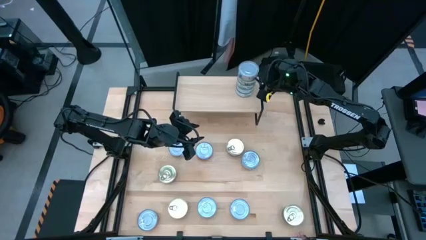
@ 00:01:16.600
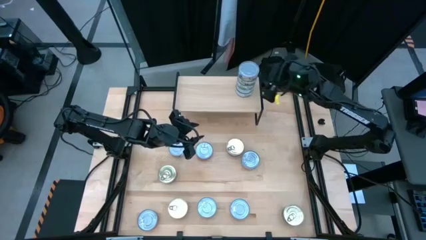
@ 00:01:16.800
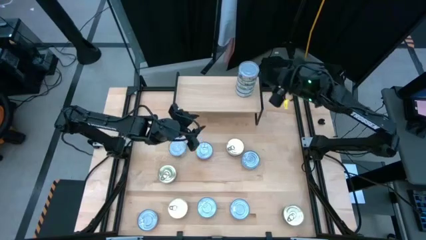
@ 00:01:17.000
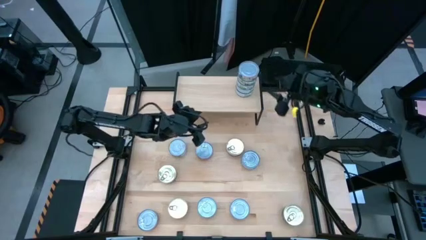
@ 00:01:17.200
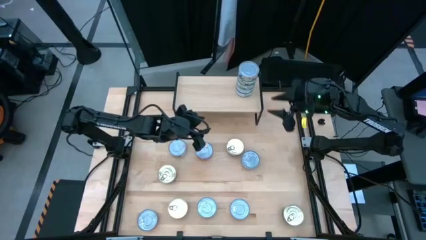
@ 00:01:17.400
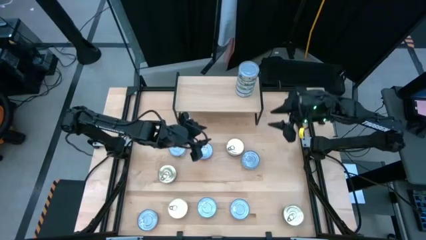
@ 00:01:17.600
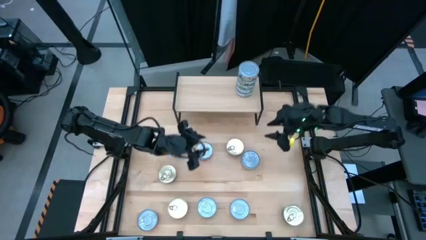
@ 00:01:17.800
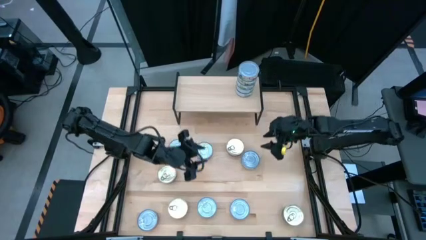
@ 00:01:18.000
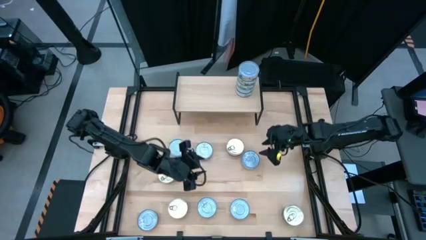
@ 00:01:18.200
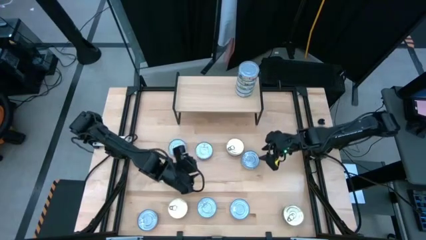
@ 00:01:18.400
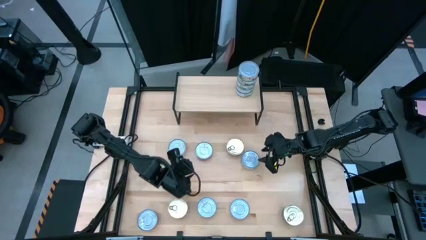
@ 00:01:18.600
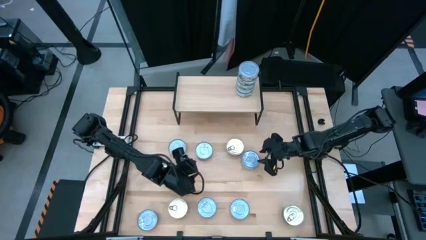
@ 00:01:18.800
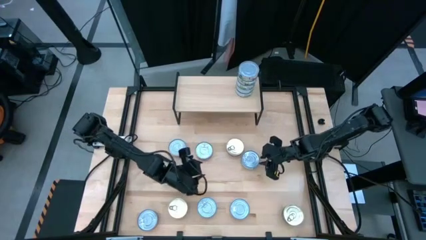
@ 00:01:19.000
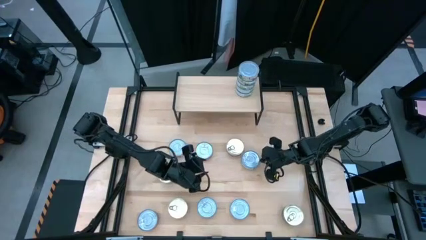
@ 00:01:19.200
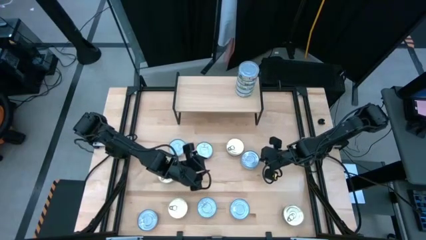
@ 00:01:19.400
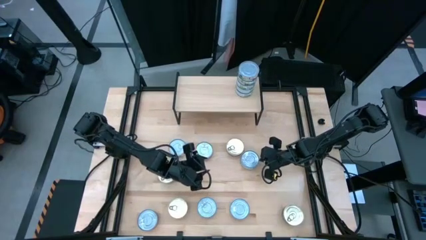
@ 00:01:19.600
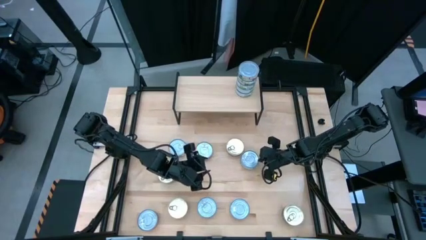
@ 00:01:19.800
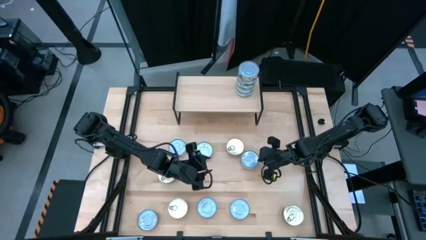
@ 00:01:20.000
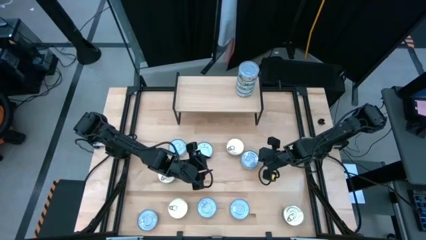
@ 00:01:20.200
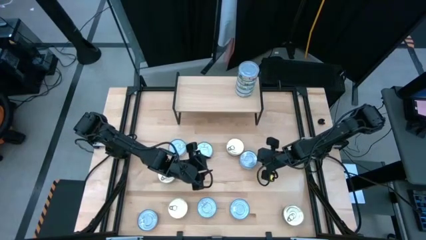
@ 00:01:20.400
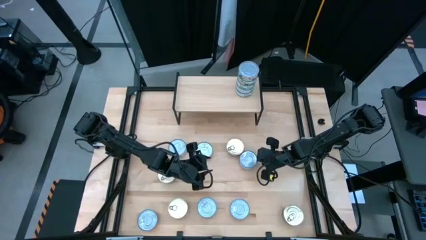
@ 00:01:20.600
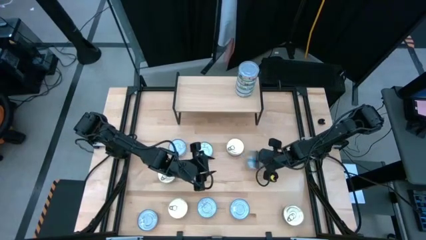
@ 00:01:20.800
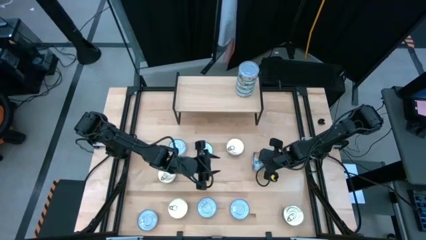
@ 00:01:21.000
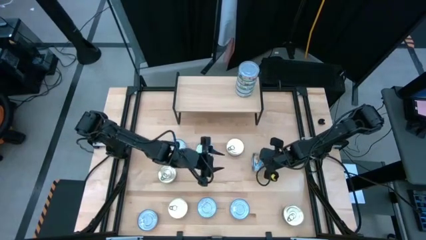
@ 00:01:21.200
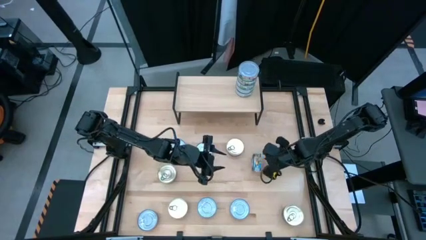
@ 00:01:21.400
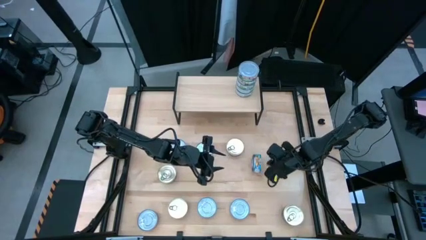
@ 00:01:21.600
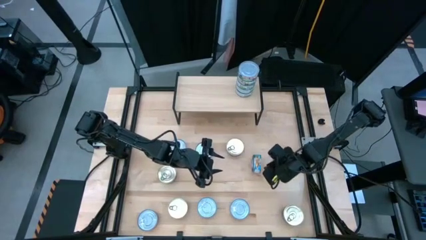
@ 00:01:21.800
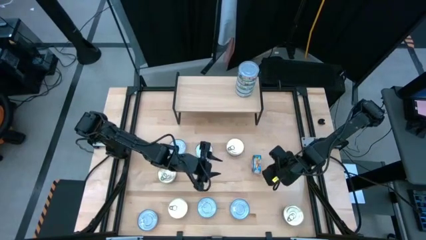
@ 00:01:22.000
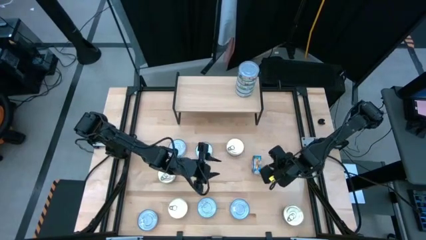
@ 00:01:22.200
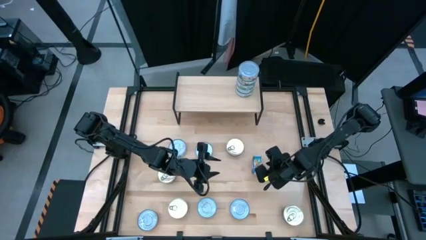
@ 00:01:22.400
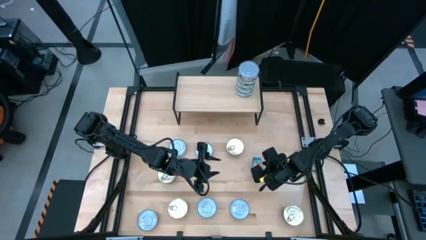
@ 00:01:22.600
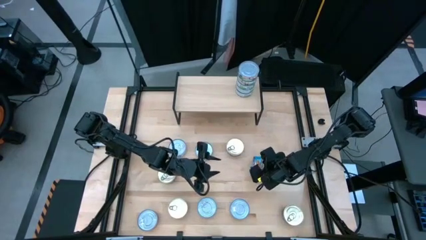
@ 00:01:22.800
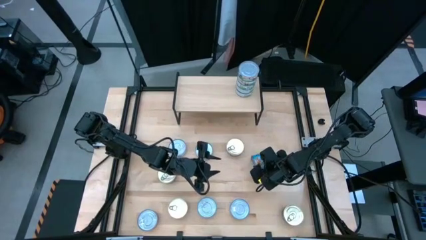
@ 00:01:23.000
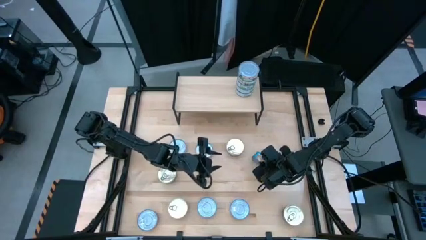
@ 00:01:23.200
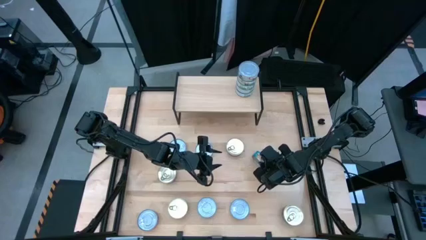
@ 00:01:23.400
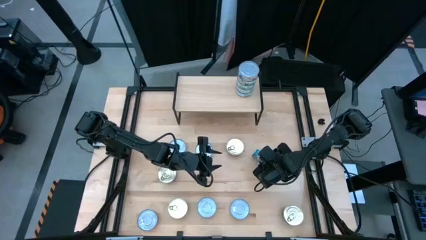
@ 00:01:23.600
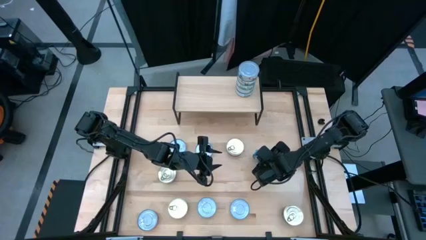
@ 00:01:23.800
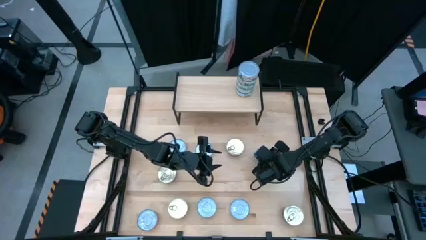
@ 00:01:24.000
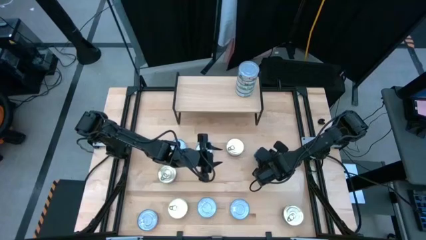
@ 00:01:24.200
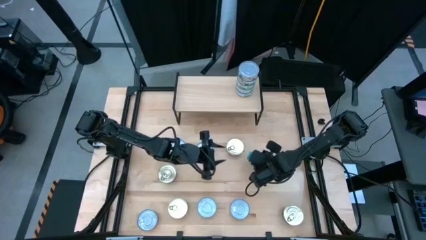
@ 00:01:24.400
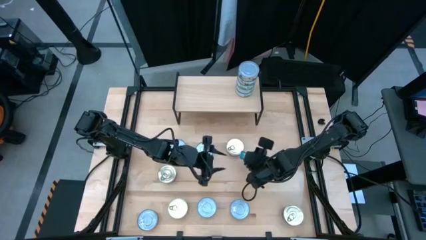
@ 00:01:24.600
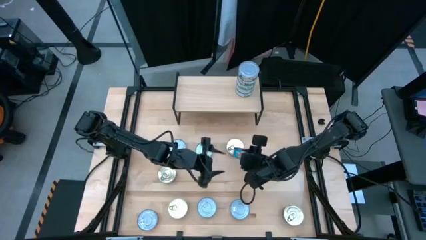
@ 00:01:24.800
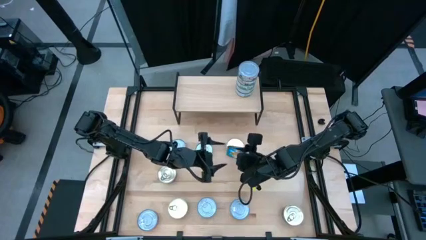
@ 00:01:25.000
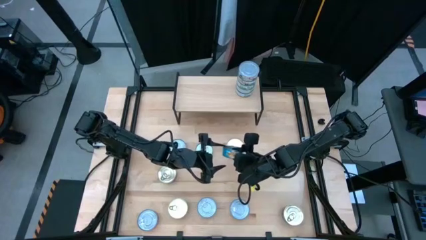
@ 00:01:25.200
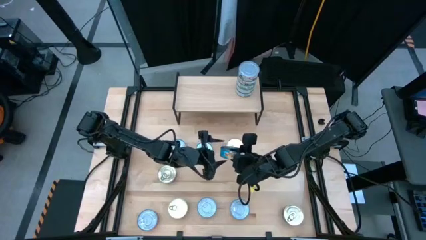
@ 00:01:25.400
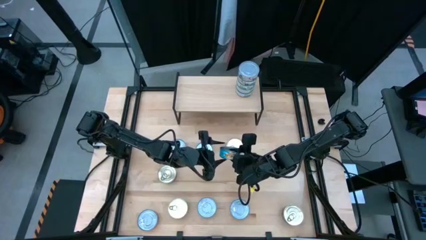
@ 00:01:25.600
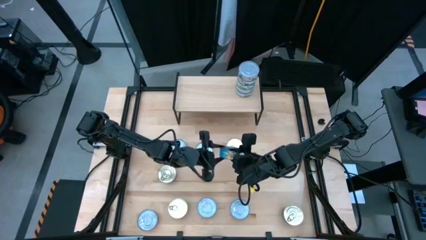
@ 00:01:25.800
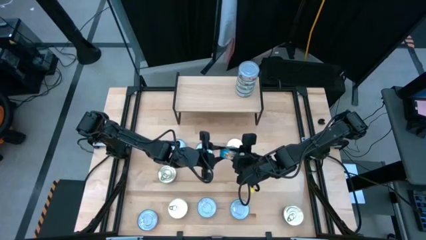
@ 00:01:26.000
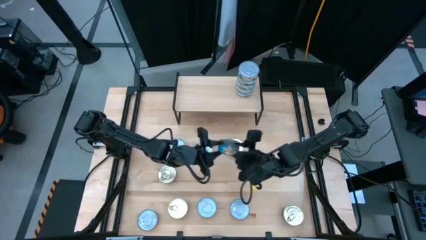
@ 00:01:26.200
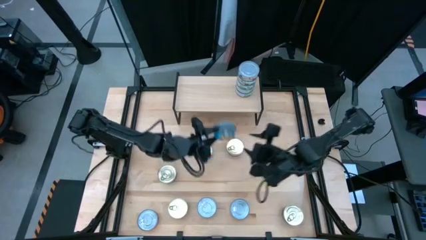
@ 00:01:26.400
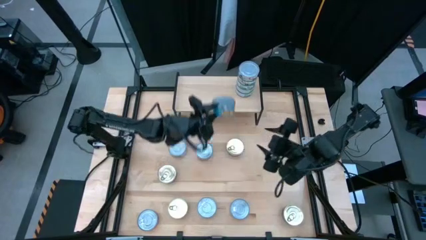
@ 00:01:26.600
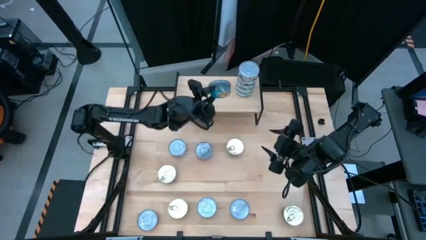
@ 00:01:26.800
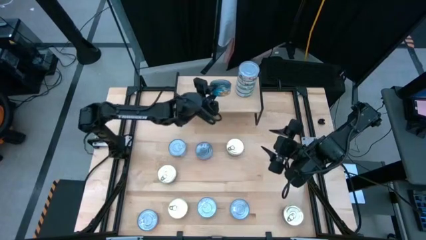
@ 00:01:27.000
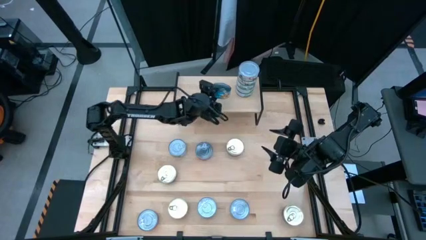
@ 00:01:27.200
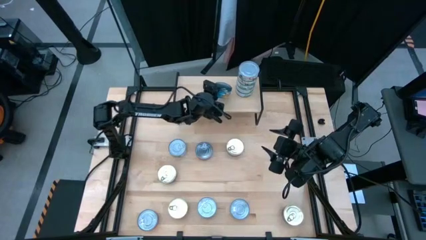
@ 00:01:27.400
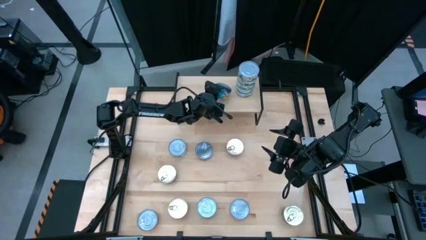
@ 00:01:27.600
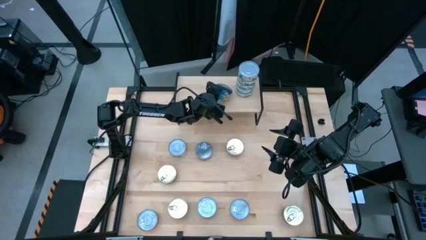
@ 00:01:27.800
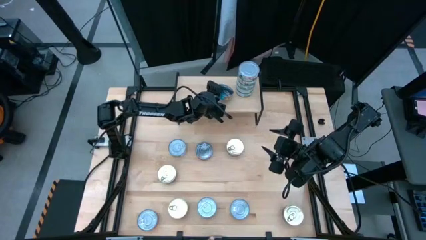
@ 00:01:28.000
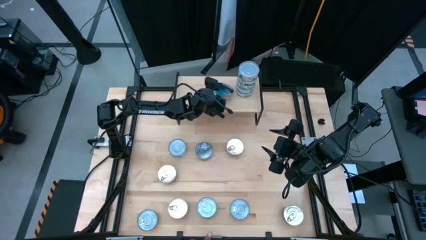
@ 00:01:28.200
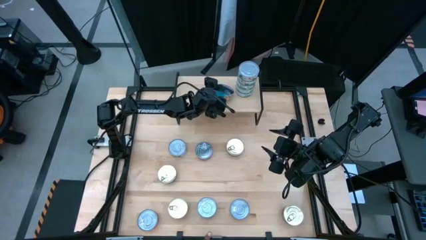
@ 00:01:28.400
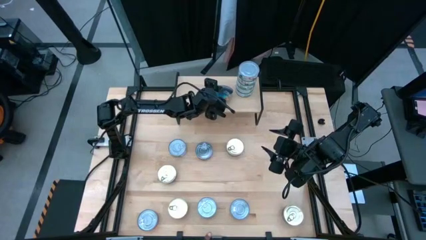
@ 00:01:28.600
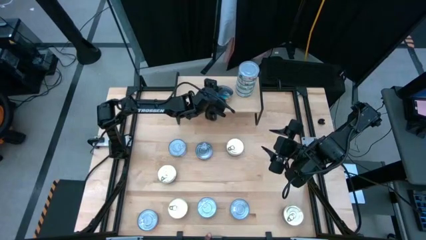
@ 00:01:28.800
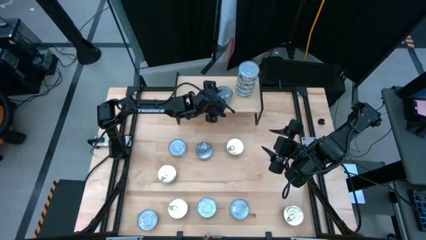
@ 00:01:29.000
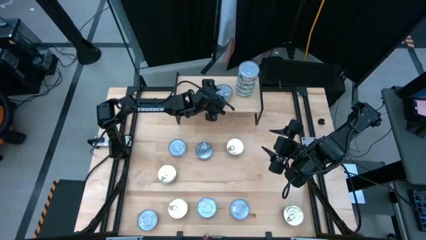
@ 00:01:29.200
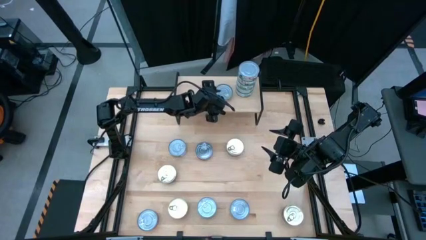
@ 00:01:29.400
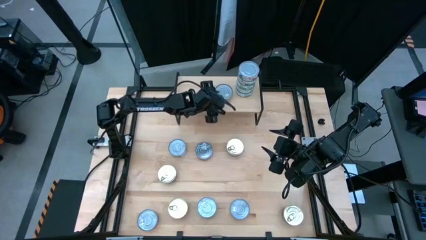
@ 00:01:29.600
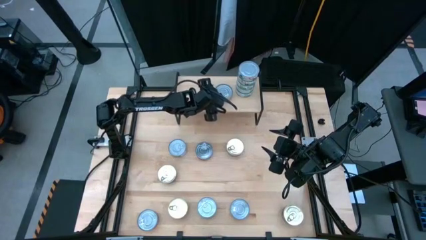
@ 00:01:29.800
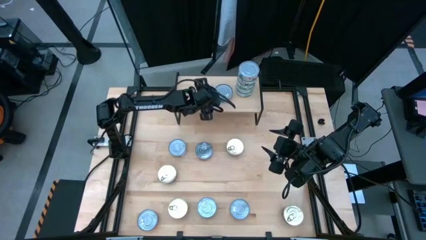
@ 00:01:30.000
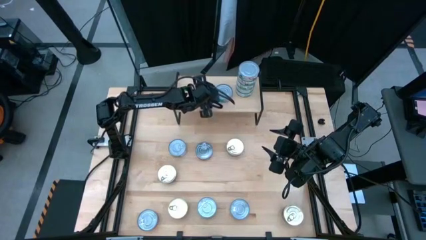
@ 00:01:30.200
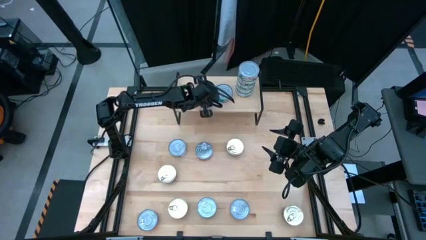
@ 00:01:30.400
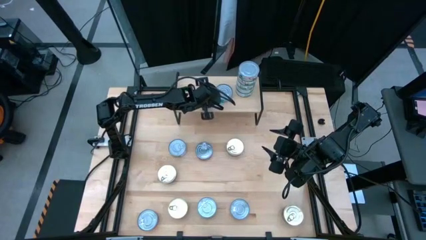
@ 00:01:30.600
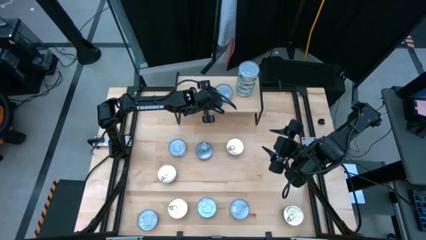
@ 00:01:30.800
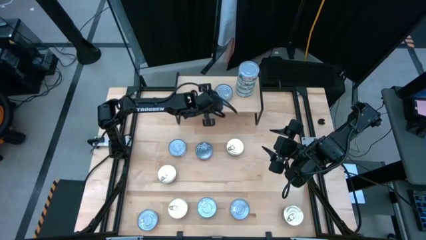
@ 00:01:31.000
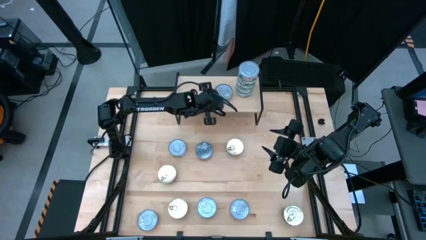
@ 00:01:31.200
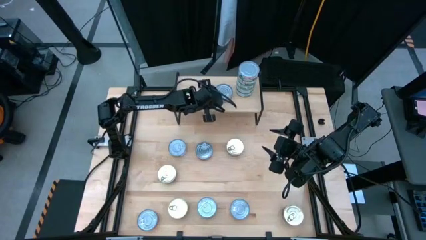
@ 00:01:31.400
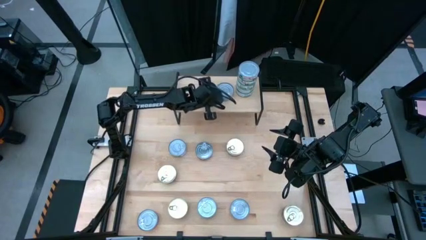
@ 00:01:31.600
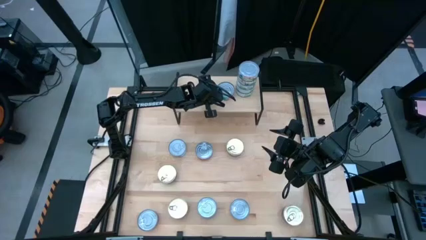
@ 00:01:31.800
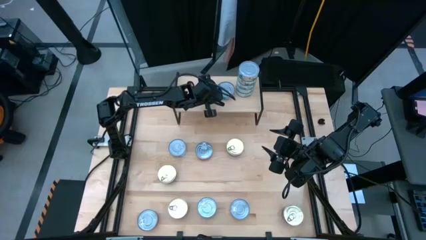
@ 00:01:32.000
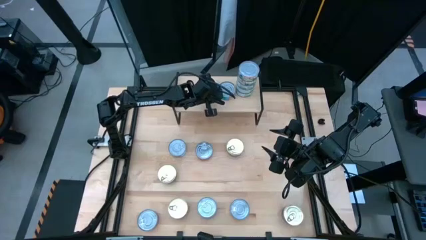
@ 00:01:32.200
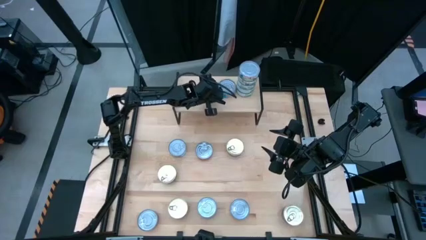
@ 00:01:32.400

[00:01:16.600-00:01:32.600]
Task: Stack canned seafood by type on shelf
Put the blue tuna can on the shelf
